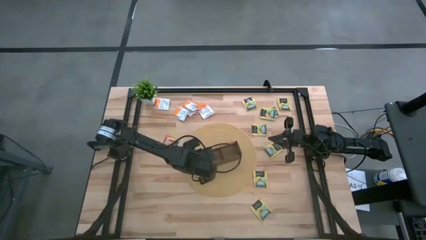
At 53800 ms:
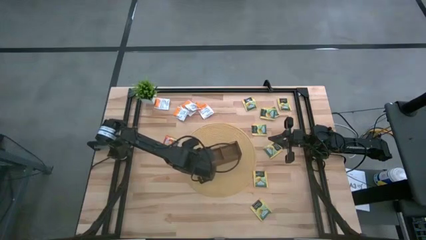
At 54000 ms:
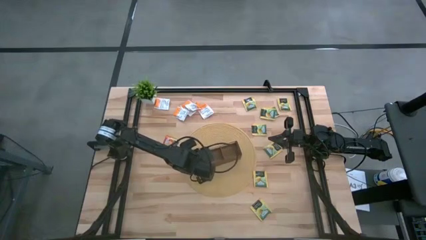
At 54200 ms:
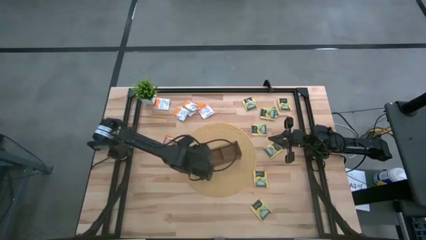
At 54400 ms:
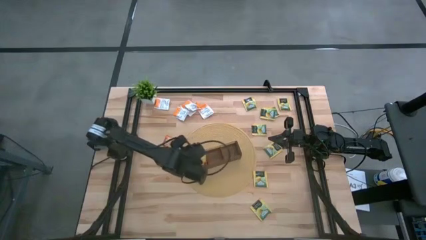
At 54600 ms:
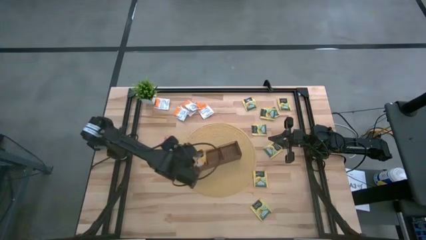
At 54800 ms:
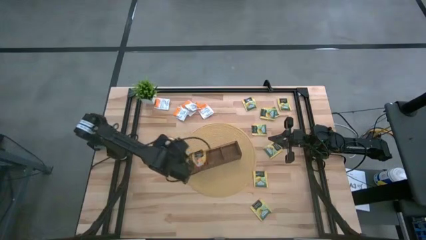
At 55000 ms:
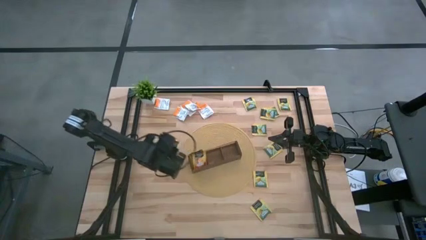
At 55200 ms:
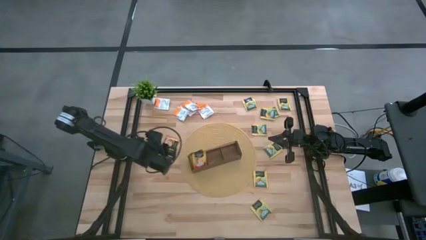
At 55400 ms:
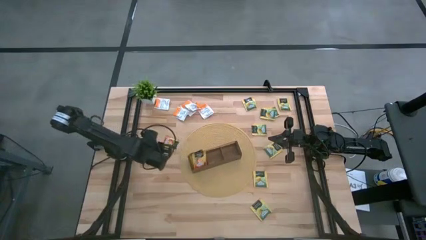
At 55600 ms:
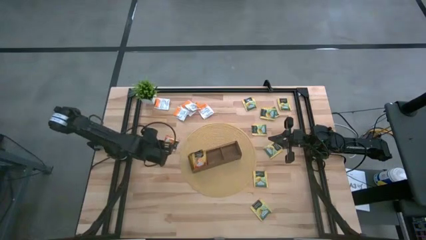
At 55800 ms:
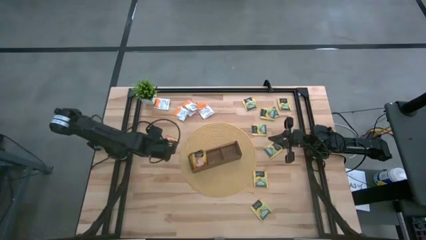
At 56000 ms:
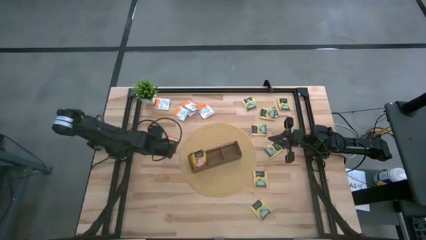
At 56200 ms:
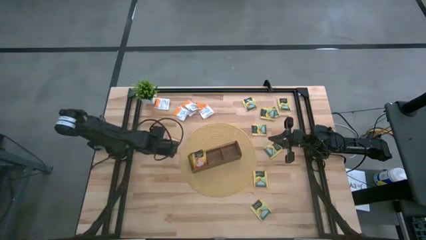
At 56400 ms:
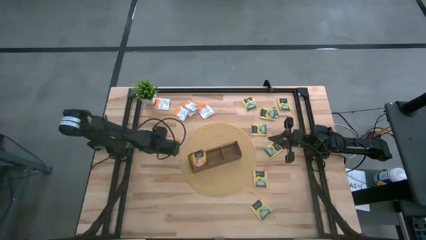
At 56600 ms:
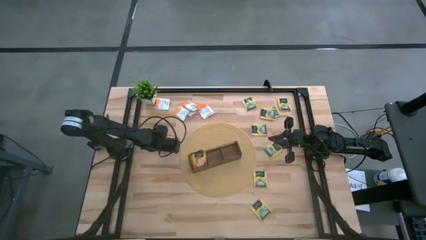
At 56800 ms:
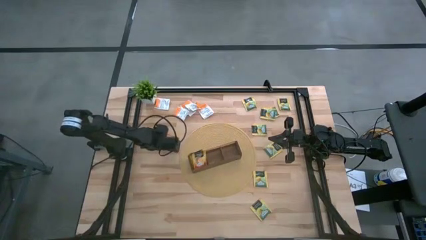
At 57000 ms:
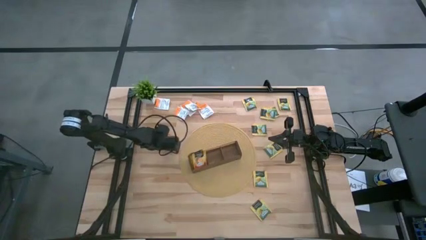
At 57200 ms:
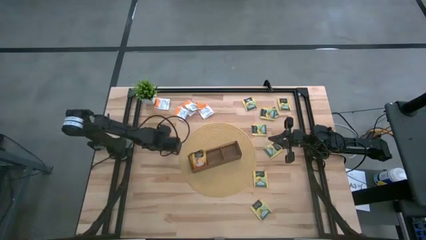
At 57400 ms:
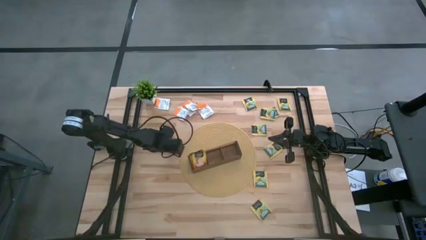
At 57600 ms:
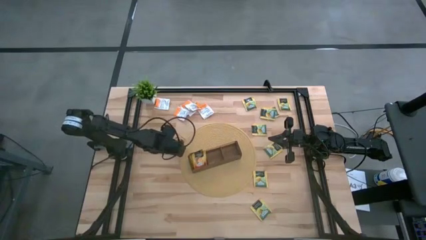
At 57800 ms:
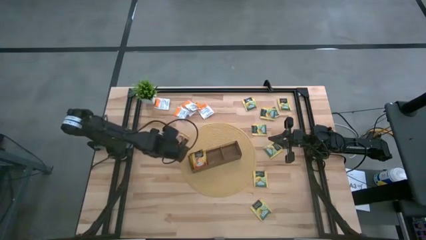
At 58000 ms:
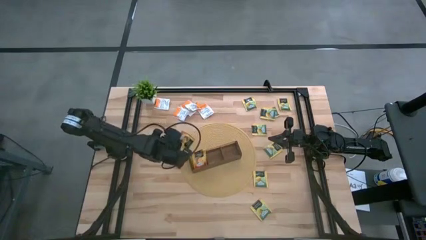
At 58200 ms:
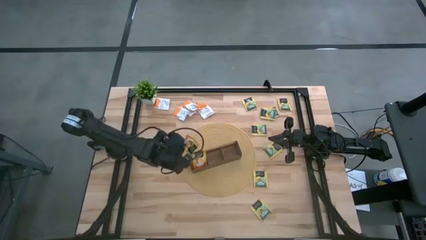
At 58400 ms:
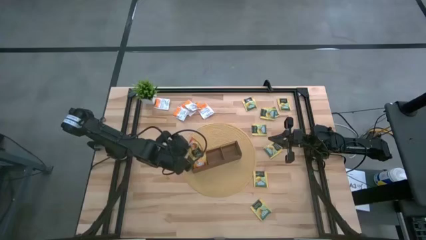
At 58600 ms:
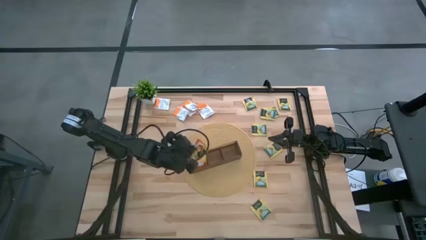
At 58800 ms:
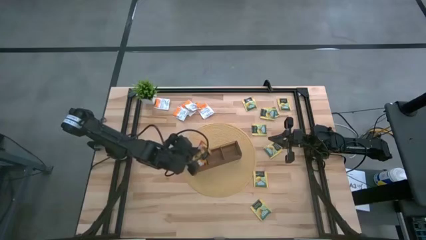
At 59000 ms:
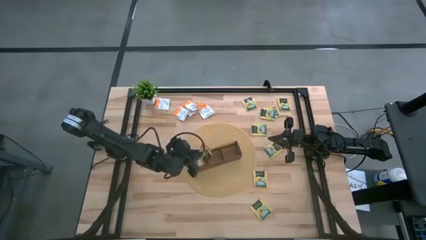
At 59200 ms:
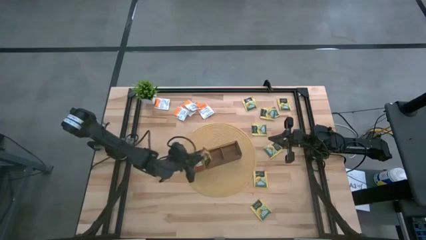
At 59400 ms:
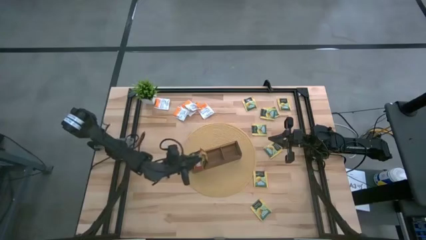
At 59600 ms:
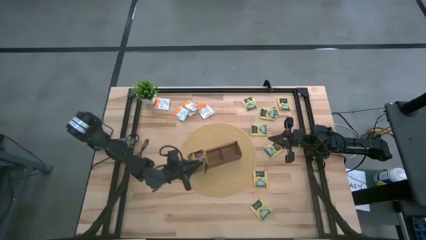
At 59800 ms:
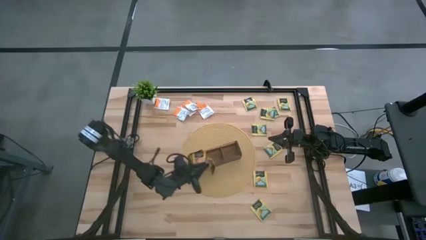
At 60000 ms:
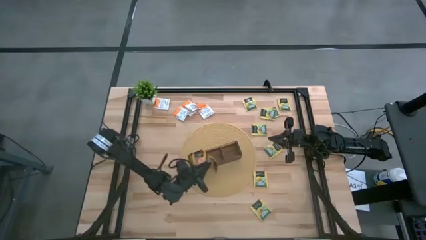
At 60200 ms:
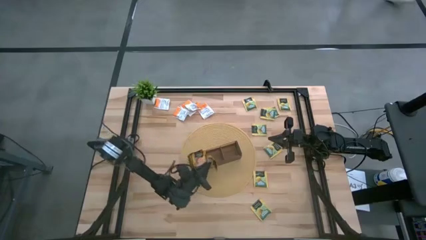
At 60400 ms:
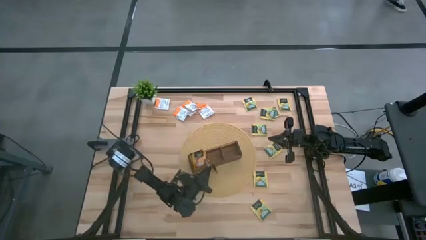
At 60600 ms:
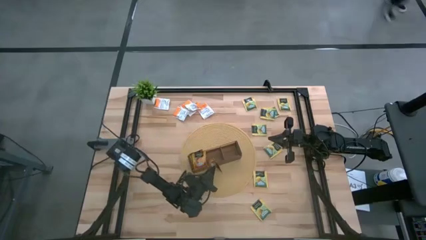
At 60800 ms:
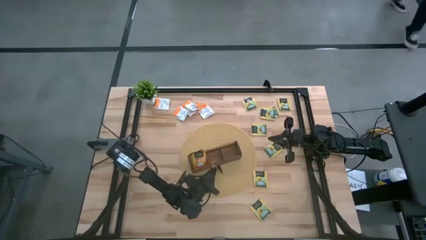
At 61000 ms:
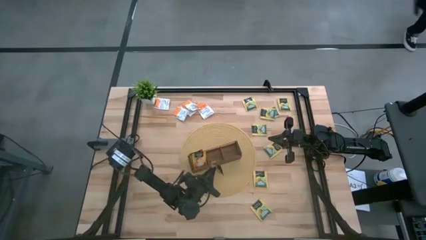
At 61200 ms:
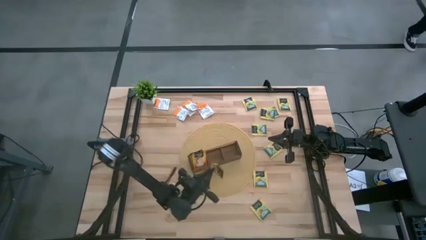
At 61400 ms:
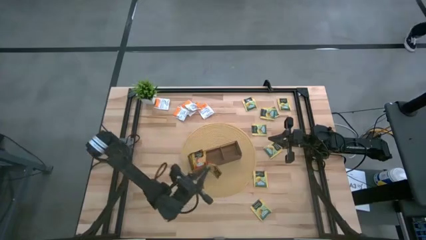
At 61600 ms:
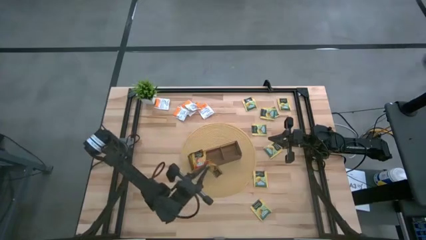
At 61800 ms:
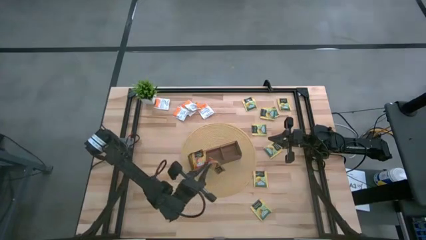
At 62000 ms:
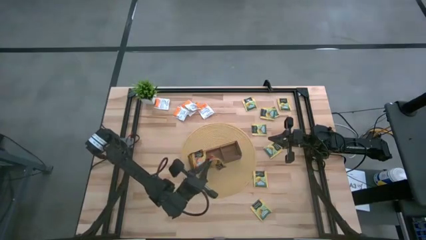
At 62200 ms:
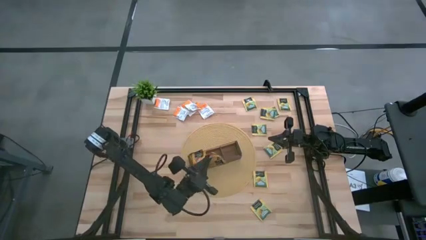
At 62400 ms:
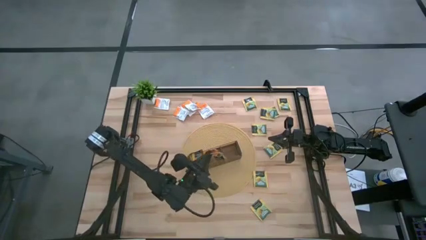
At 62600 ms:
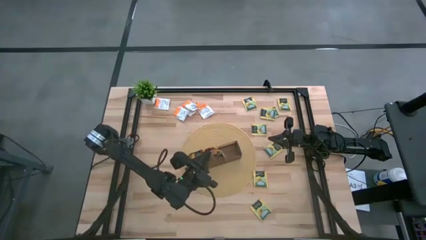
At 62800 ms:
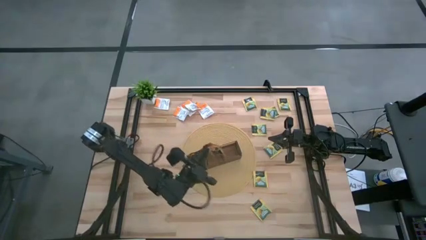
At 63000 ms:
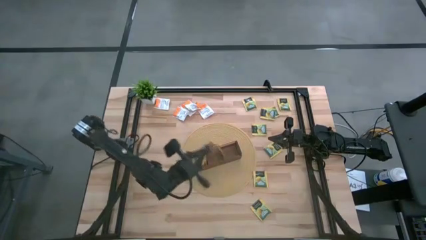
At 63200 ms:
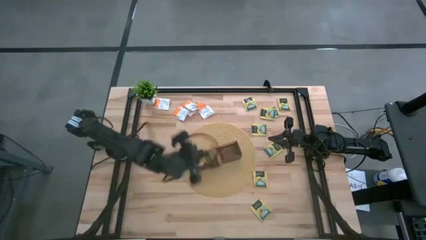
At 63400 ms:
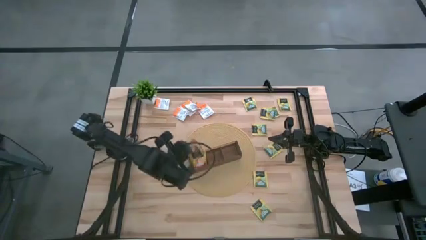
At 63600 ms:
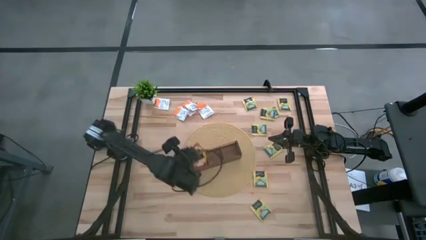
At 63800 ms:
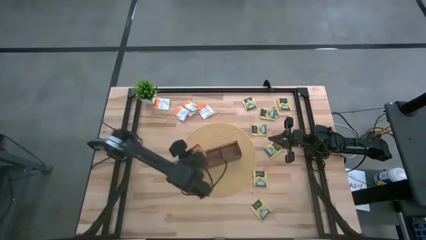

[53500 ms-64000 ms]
Task: Pick & Place Tea
Put the mango tea sachet into the left section of the wooden organizer

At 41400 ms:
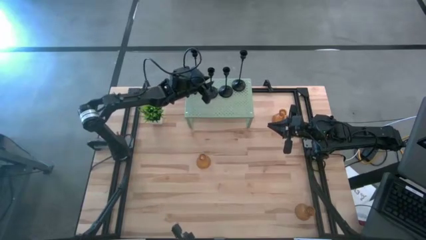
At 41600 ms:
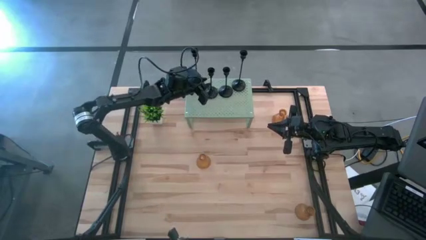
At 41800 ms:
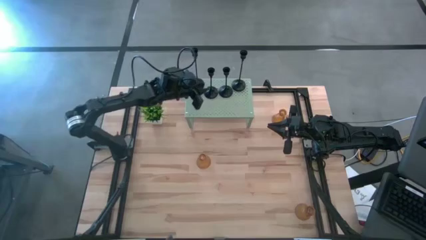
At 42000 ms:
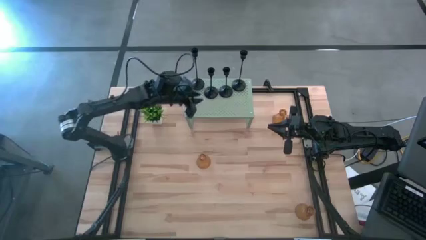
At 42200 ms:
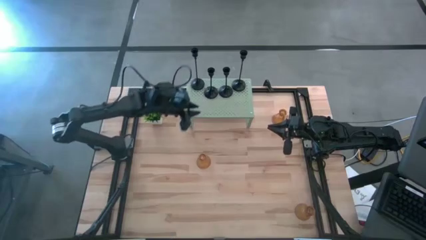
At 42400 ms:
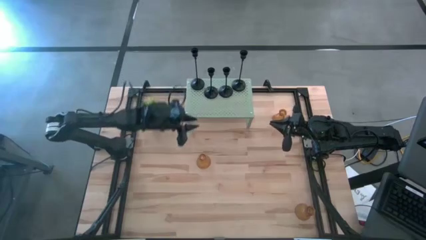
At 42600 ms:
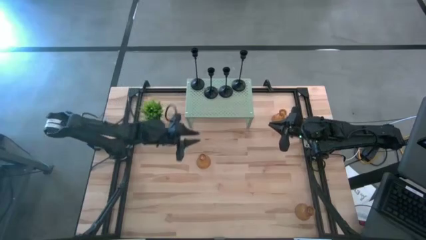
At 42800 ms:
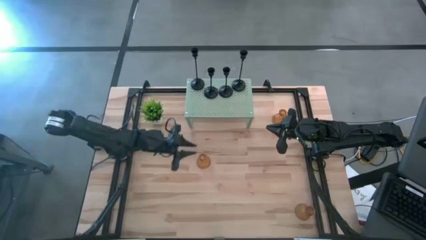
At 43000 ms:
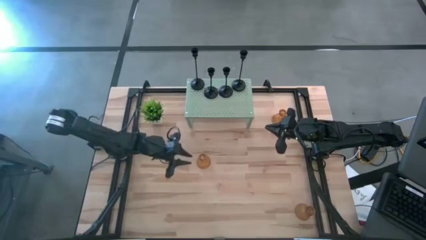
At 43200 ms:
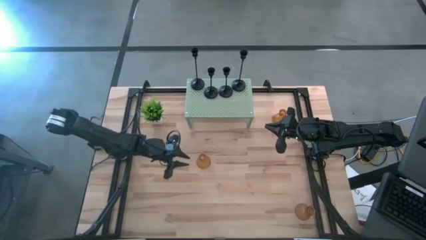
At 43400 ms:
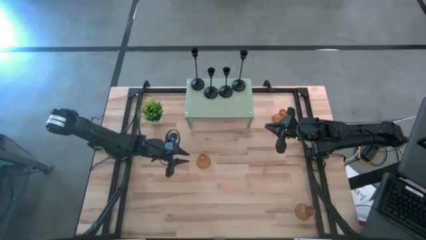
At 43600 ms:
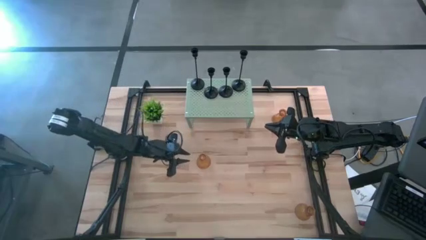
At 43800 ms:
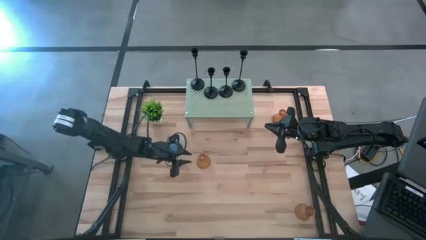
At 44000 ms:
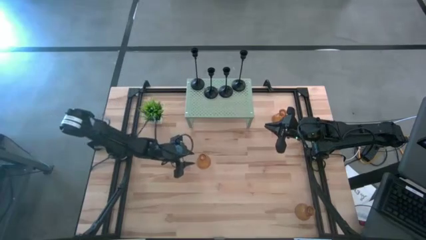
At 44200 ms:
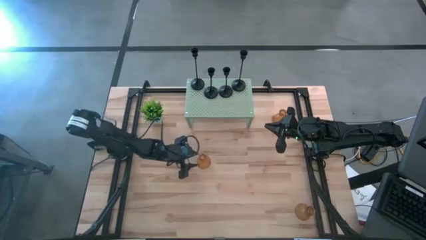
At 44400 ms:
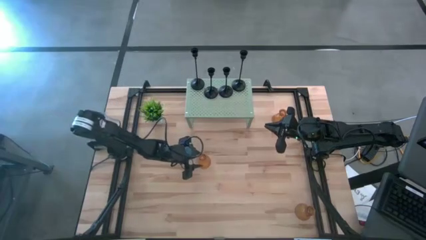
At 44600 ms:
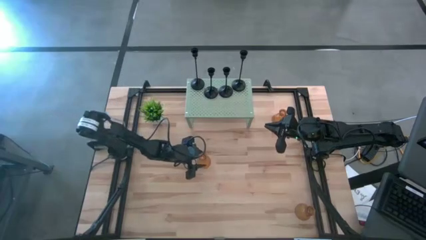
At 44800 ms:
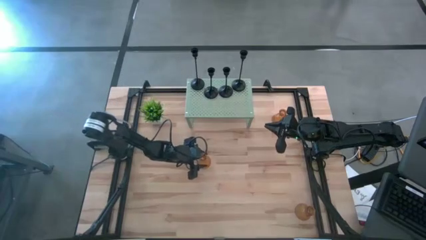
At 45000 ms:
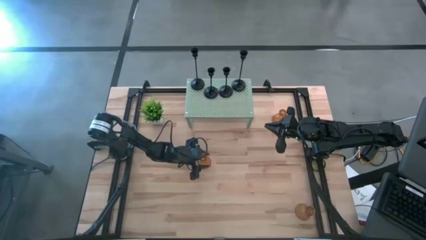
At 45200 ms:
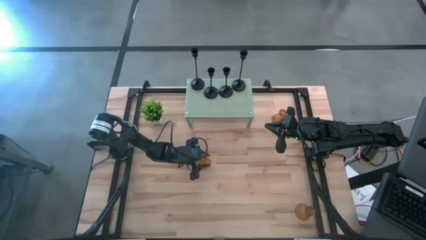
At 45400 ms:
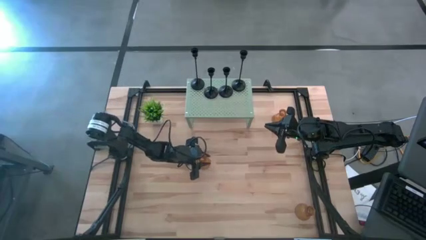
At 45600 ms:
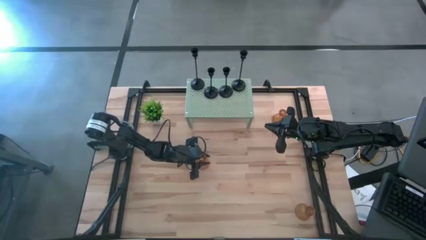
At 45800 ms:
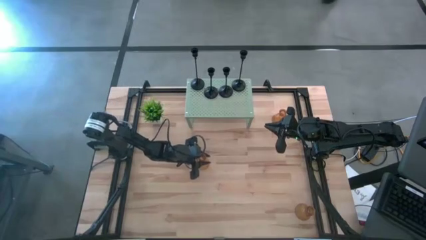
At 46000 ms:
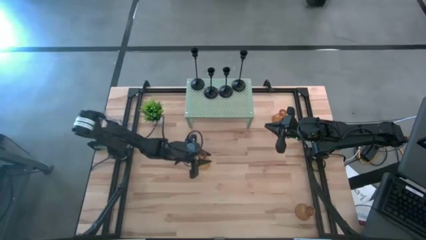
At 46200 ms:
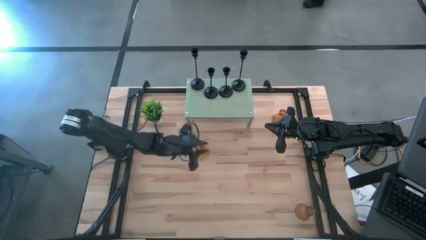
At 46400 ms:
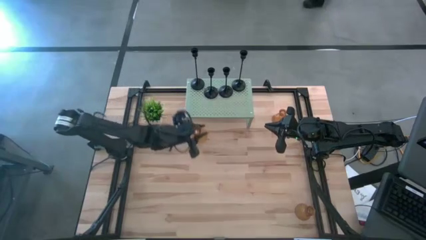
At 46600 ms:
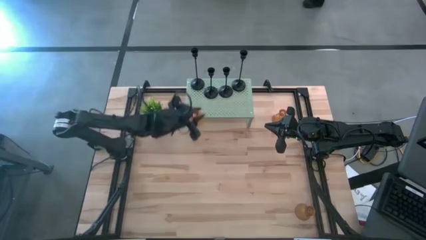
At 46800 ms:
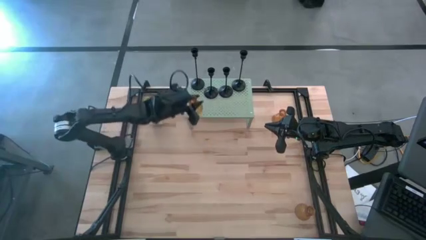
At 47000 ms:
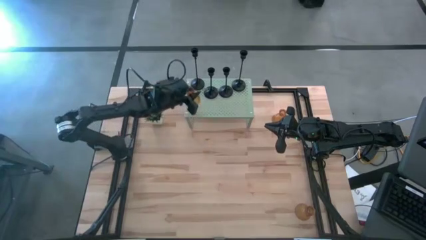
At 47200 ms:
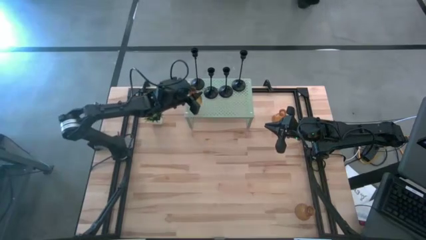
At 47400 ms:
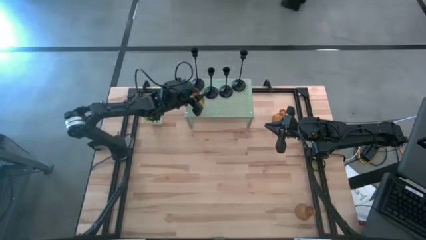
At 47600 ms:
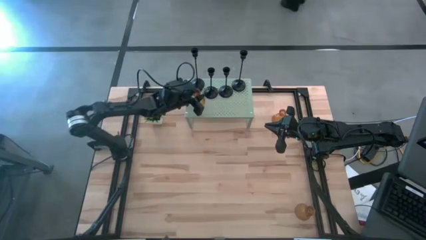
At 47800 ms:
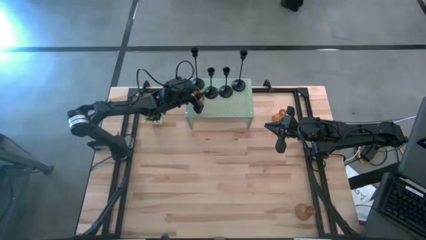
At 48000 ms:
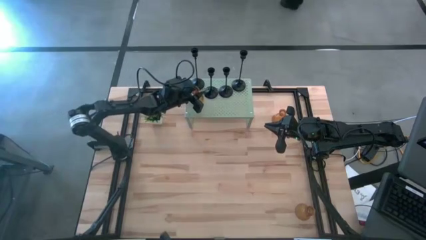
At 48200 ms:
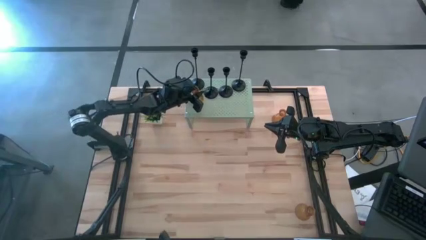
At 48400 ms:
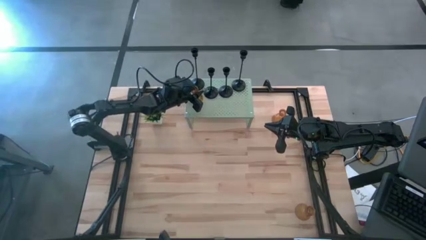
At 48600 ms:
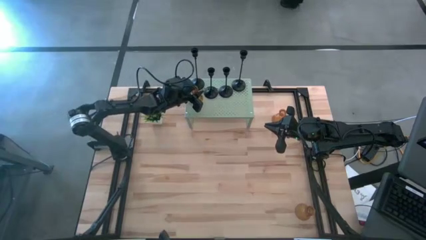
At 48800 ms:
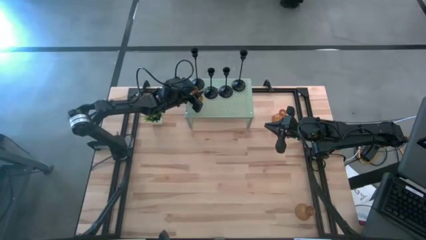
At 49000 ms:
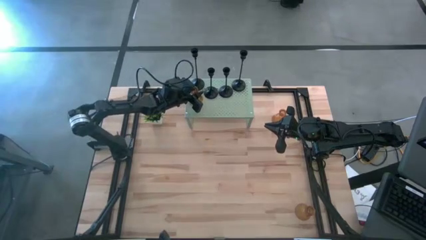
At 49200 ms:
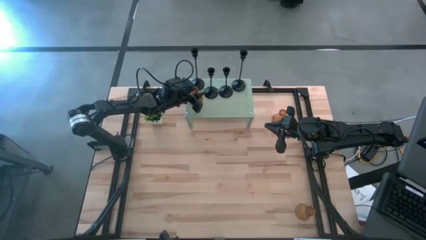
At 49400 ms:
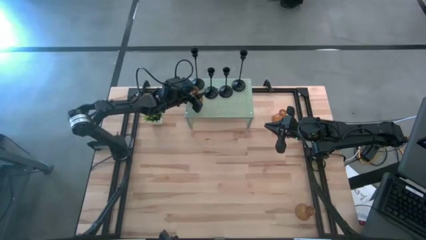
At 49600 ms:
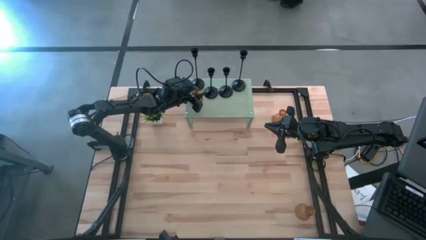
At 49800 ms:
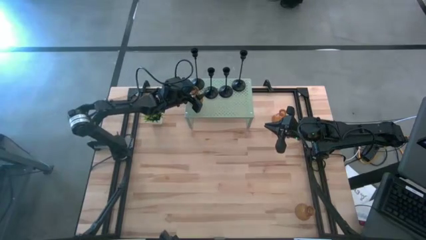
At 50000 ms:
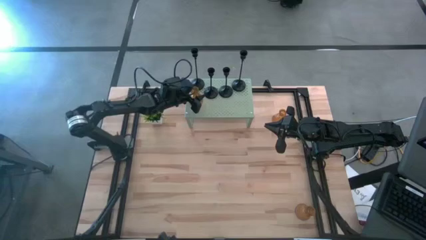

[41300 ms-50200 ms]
Task: Pick & Place candle stick holders
Put the middle left orange glass candle holder on the shelf
